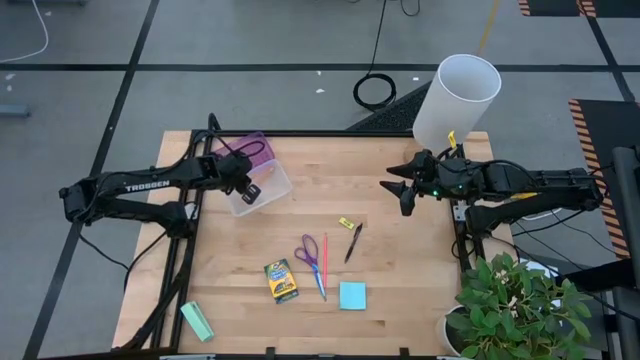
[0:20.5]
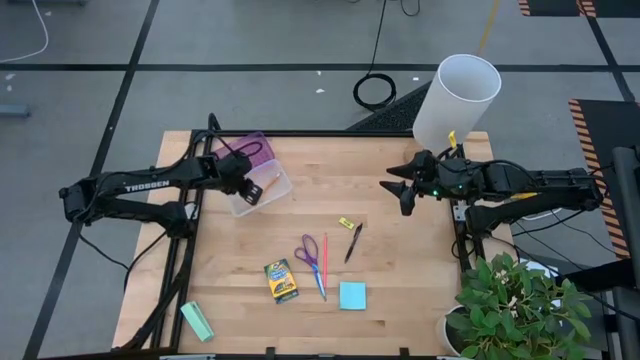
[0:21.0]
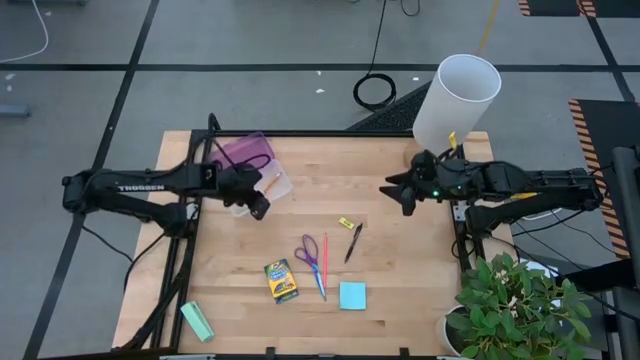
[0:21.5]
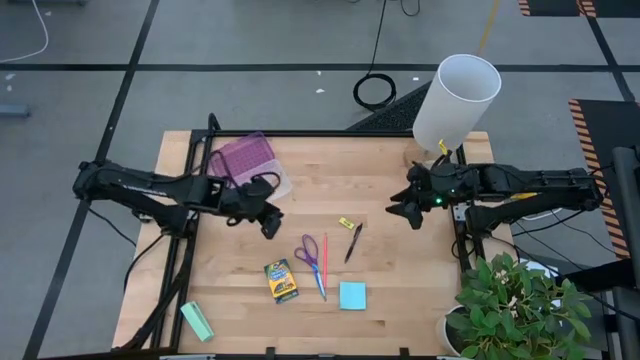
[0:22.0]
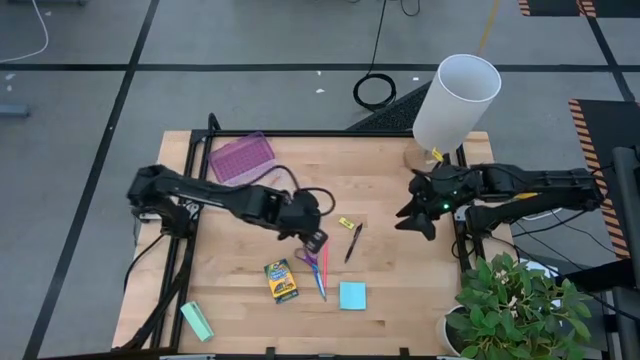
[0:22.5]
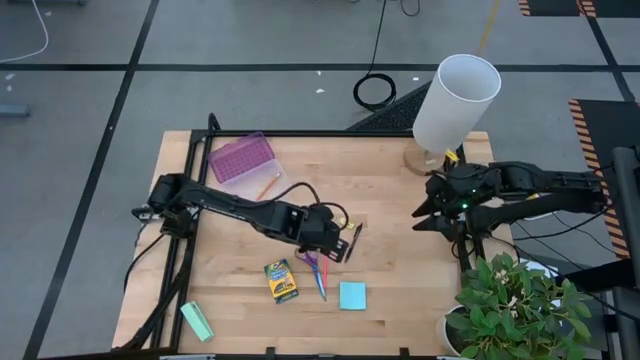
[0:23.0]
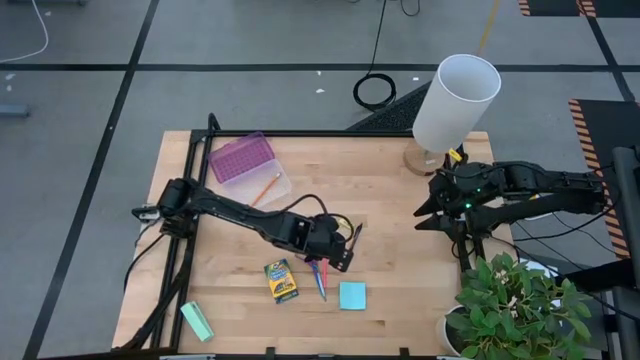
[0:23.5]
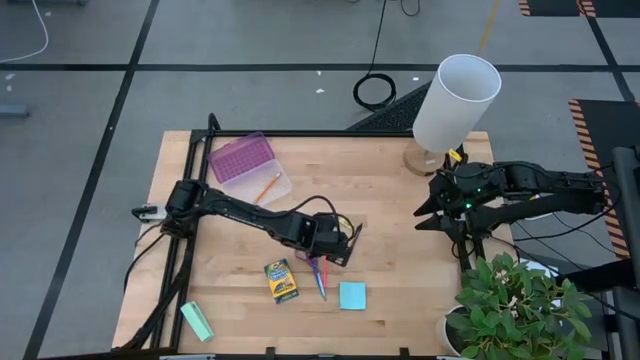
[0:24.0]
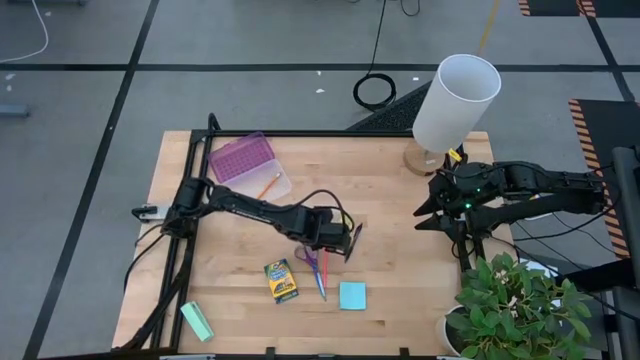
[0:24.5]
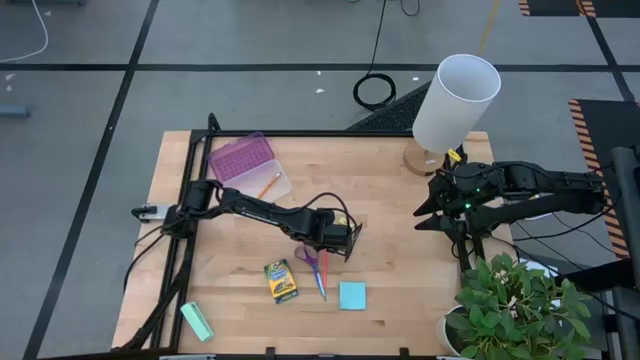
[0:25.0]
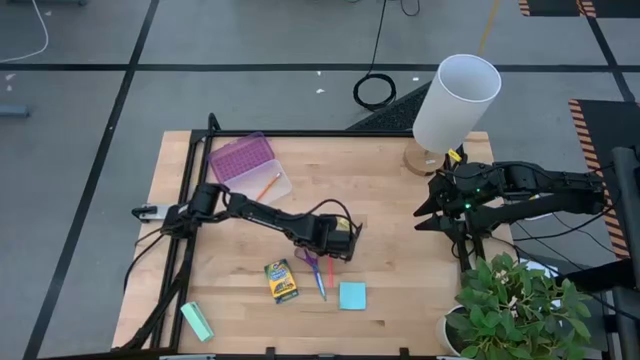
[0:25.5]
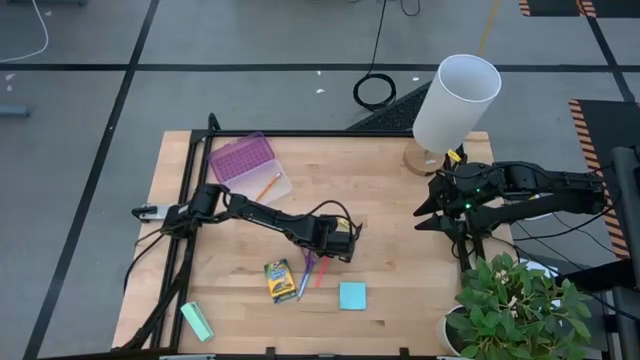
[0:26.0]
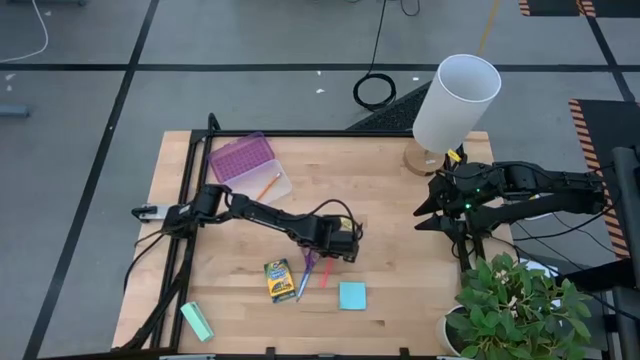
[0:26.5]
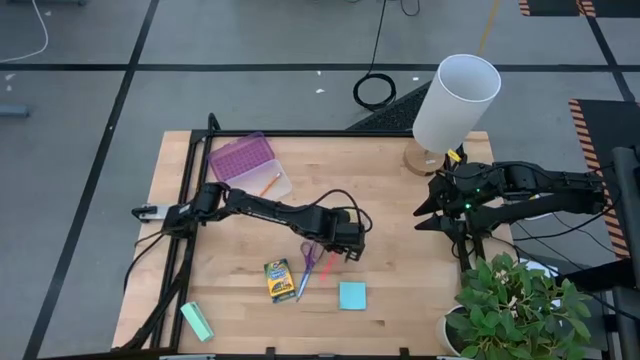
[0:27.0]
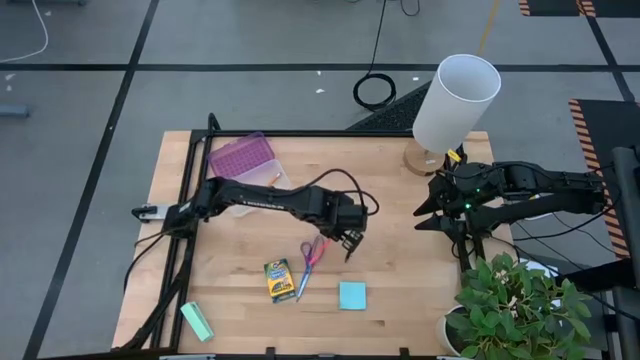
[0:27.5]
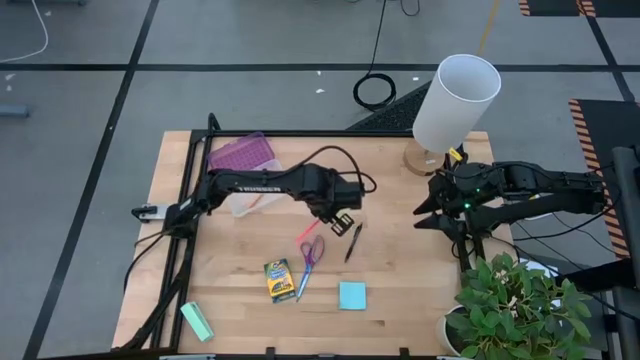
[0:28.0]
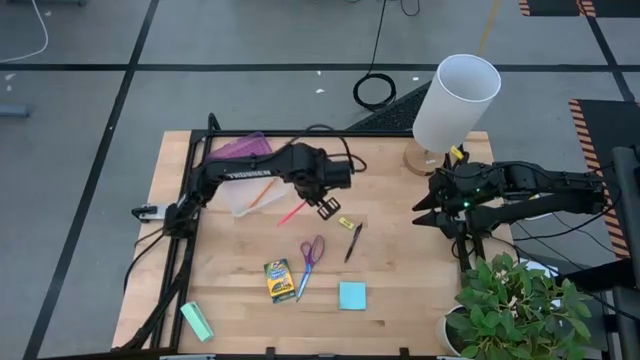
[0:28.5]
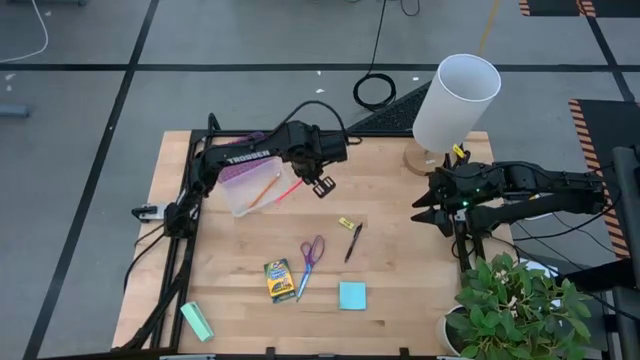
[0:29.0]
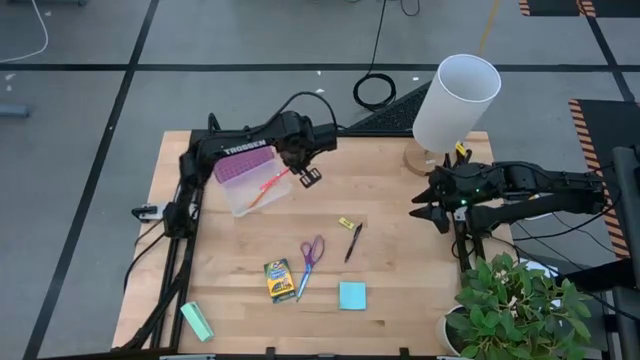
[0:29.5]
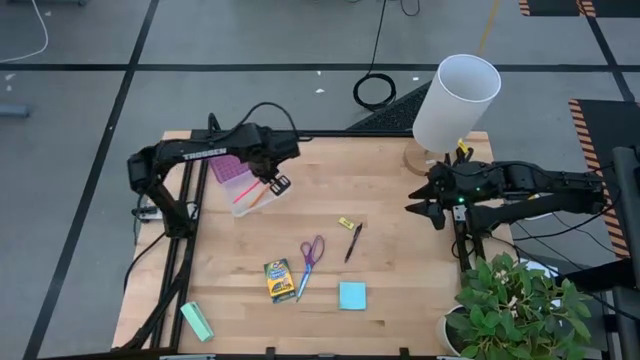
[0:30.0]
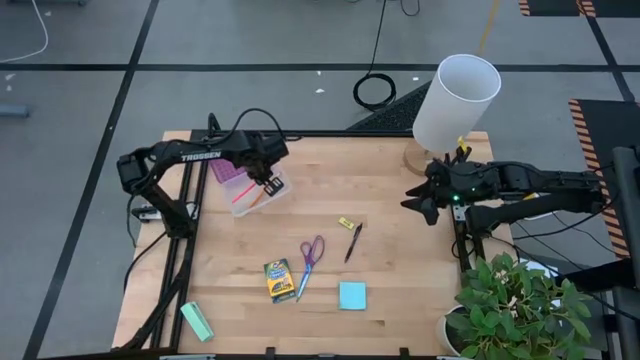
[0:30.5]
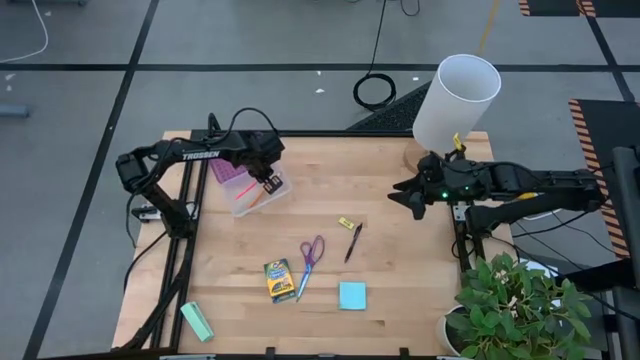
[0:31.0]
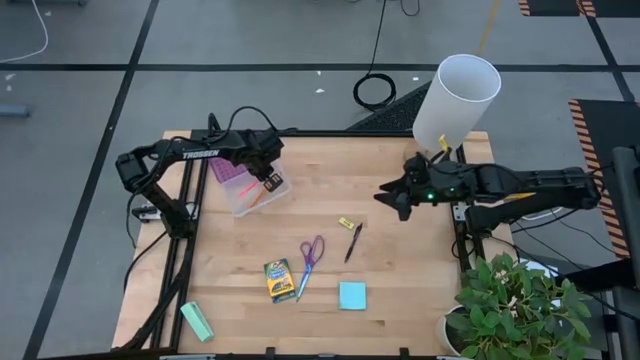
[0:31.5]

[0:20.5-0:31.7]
Task: Pack school essentials
Put the pink pencil into the supply box

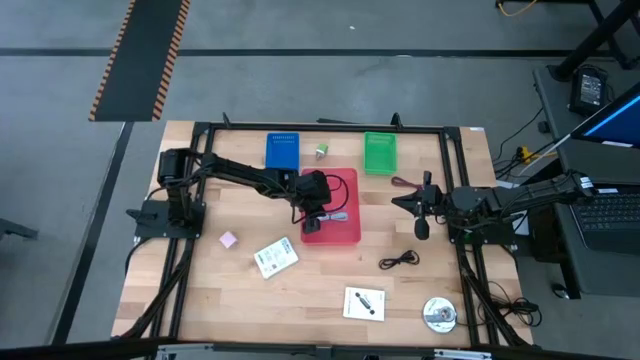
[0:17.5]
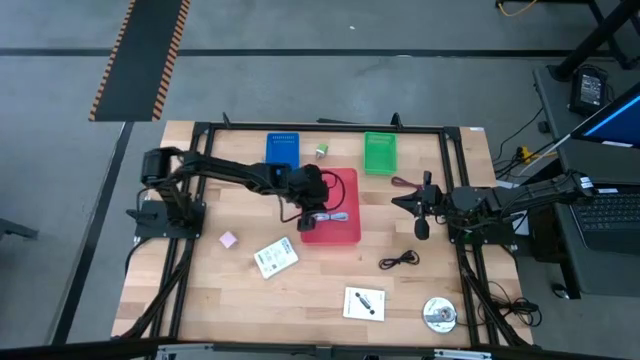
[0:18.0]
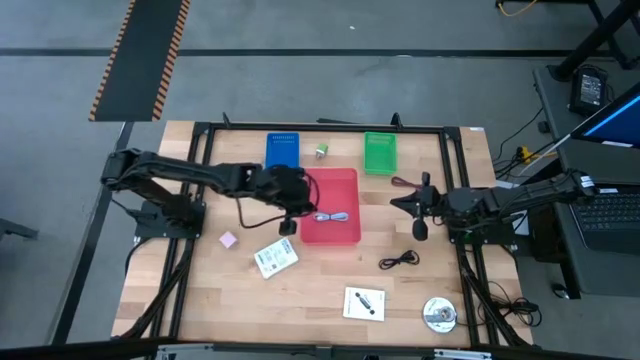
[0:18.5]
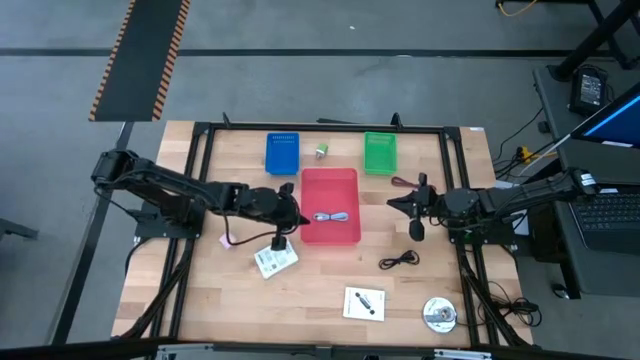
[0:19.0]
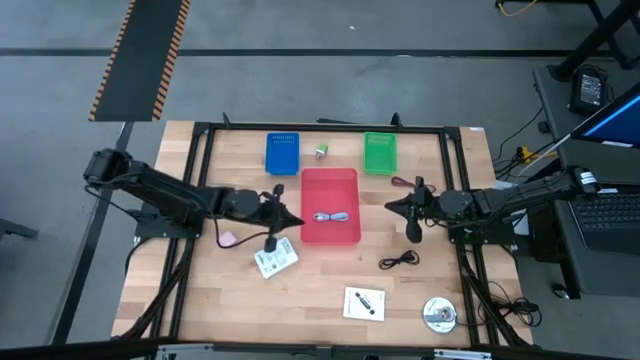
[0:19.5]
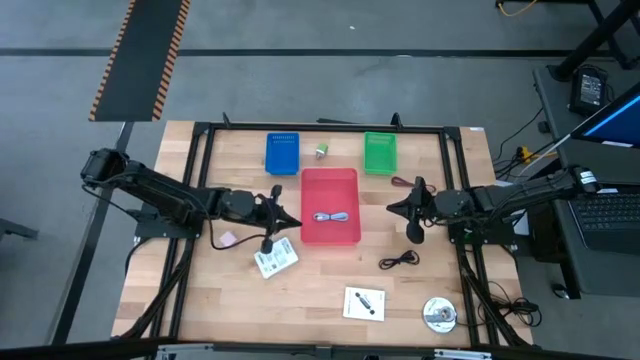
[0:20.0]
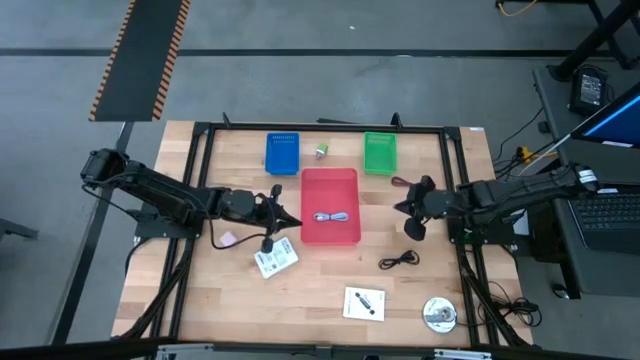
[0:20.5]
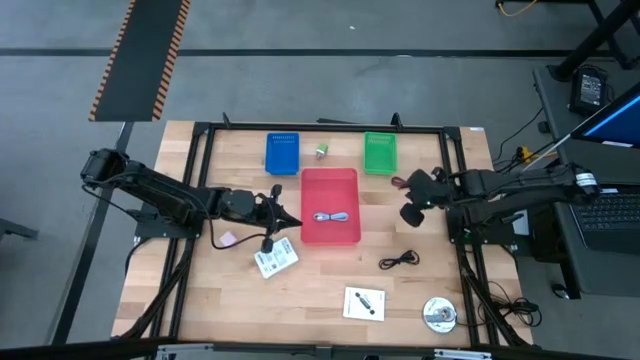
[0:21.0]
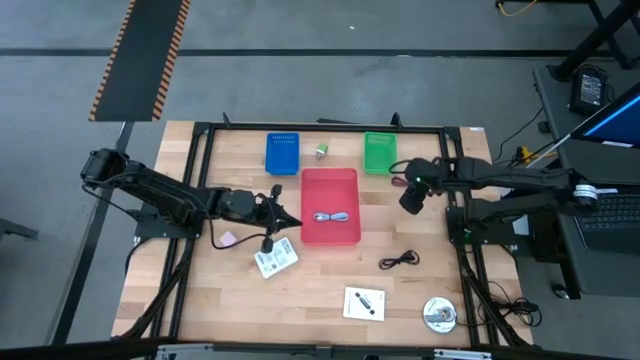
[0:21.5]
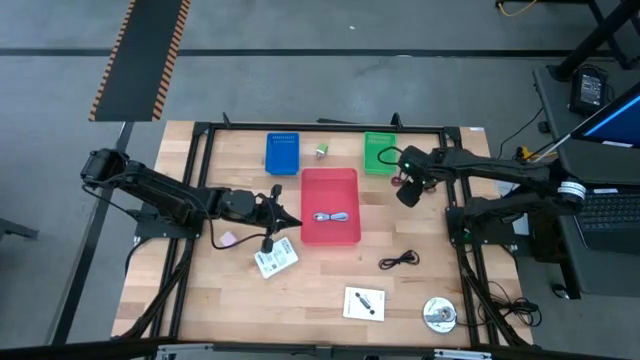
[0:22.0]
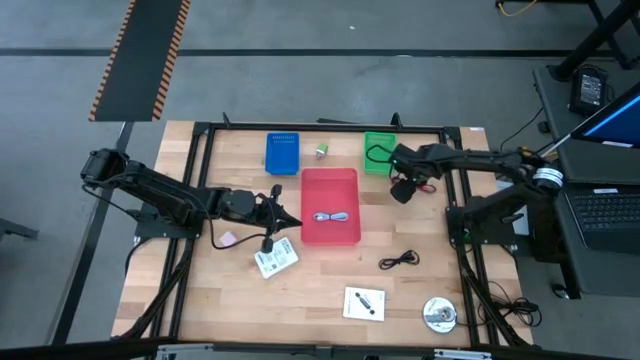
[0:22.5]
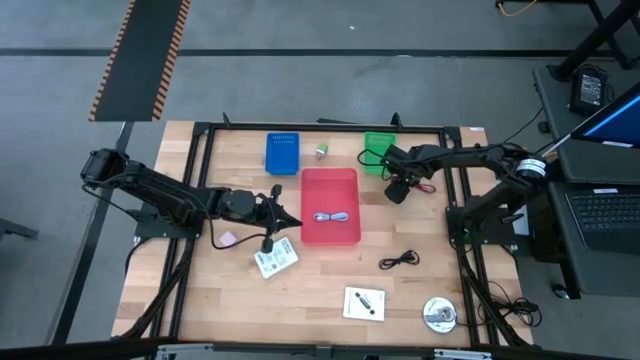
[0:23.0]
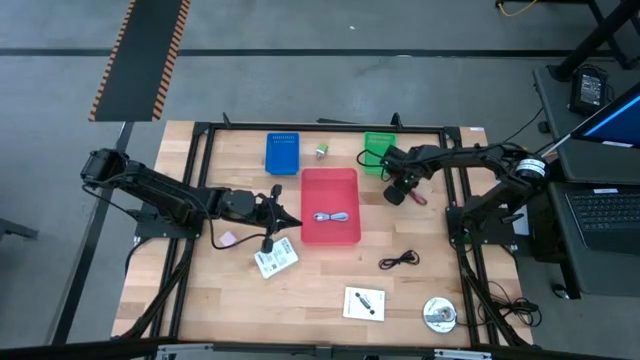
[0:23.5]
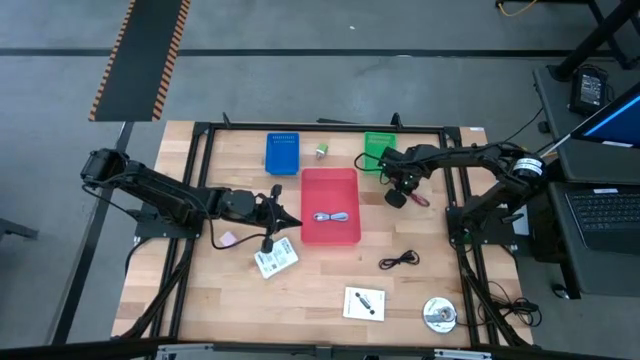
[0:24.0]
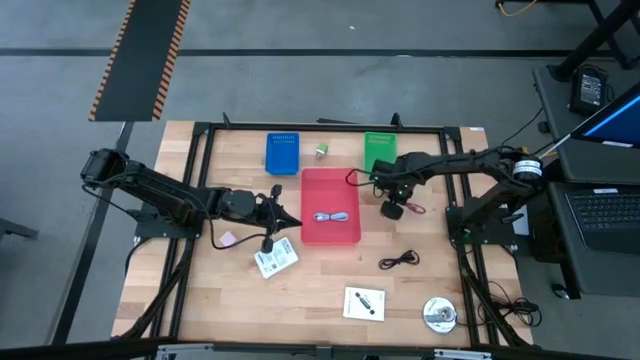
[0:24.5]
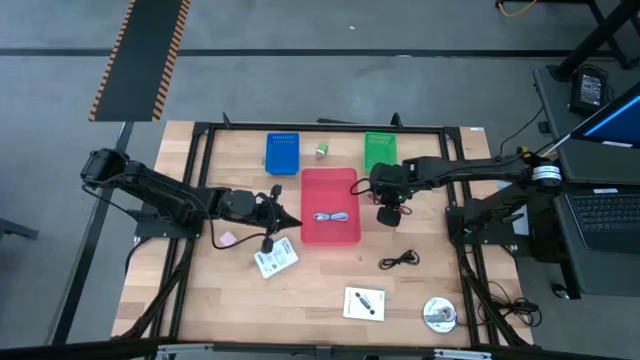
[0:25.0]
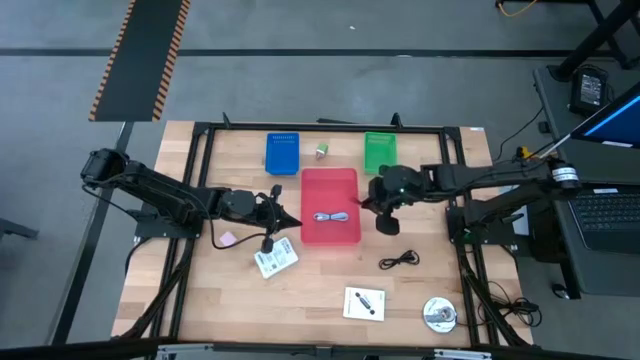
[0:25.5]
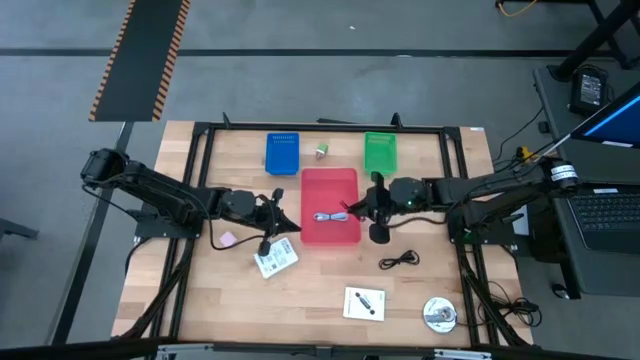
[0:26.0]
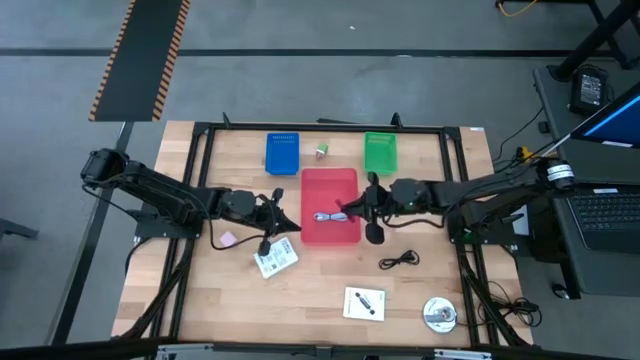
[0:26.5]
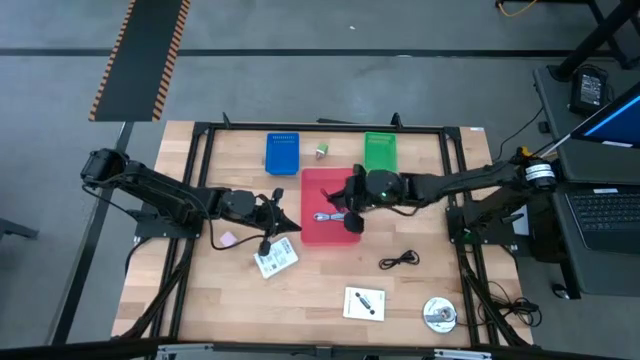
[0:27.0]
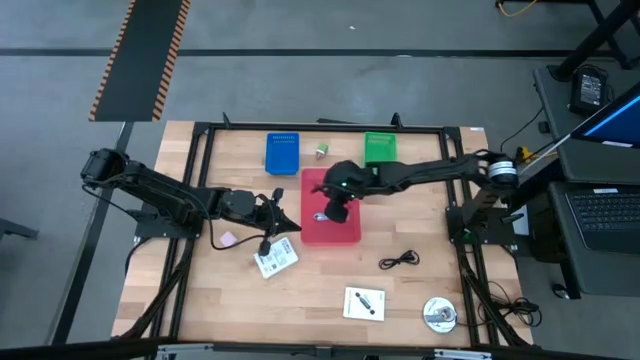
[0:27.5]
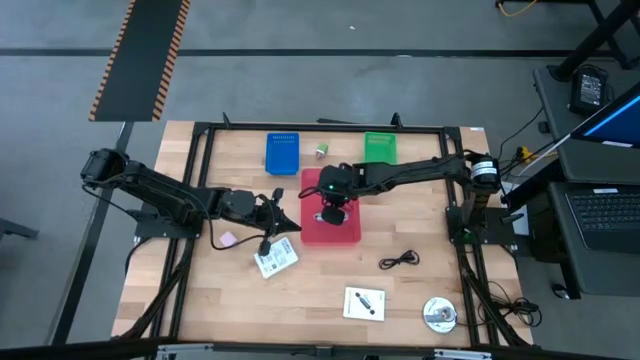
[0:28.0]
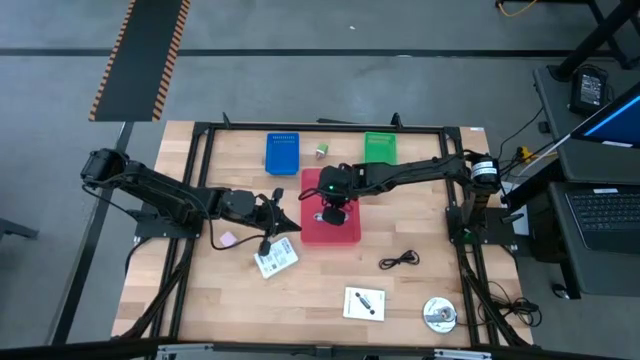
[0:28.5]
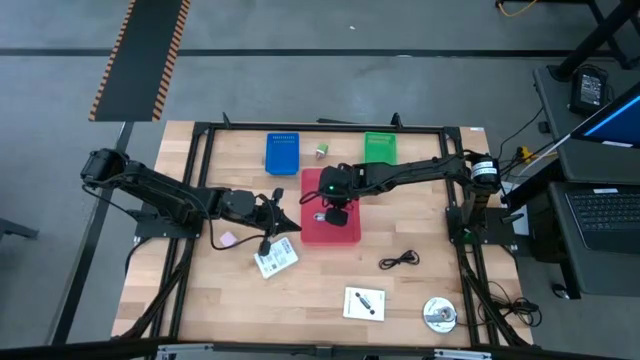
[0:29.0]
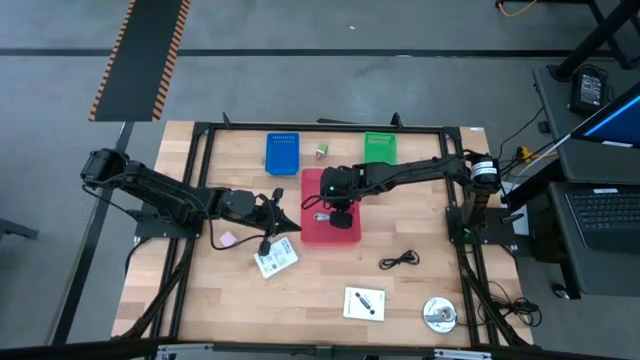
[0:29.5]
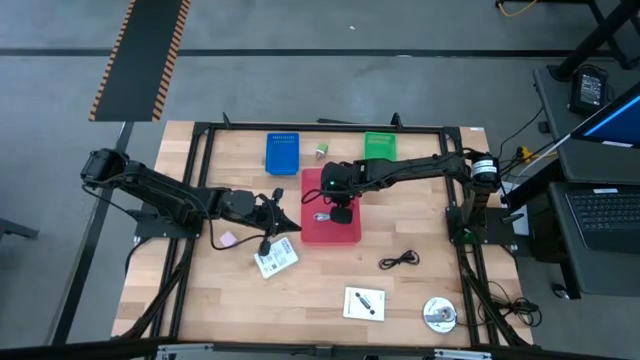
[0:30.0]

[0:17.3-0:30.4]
Task: Pick and place items into bin
Put the pink charger cable into the red bin
